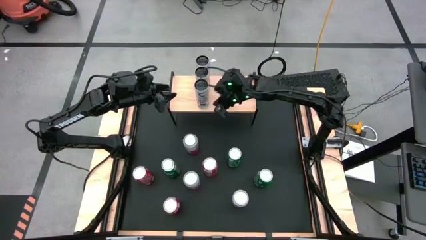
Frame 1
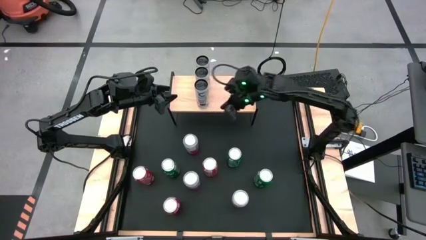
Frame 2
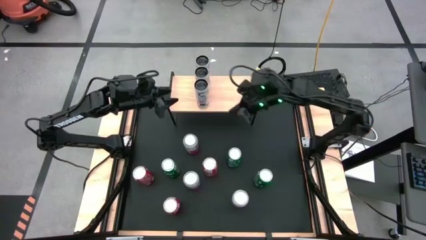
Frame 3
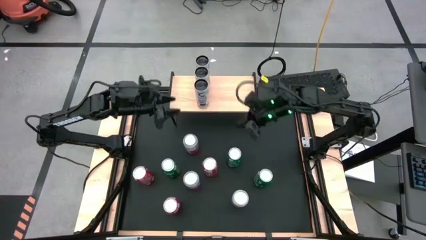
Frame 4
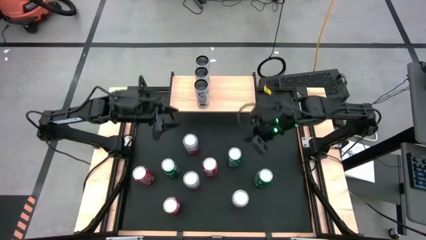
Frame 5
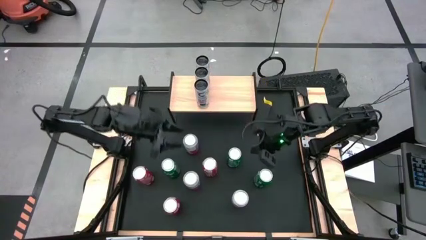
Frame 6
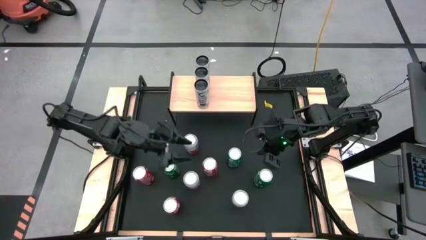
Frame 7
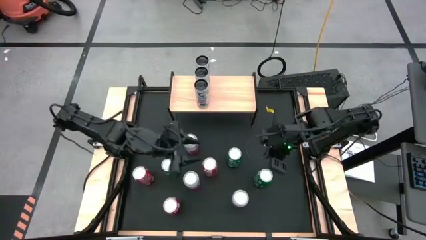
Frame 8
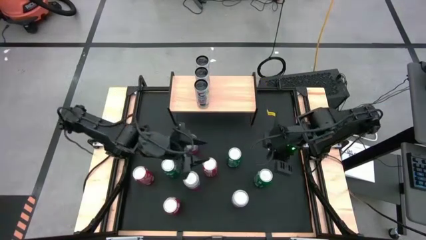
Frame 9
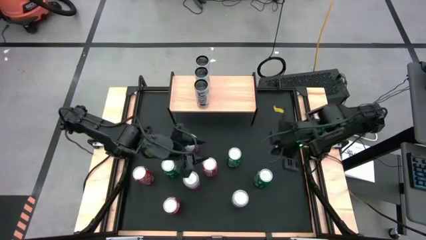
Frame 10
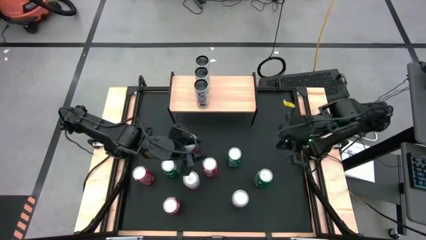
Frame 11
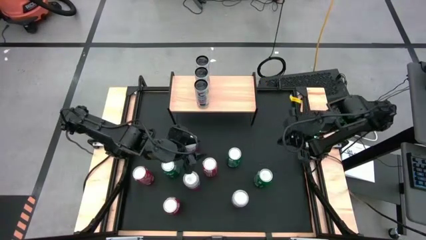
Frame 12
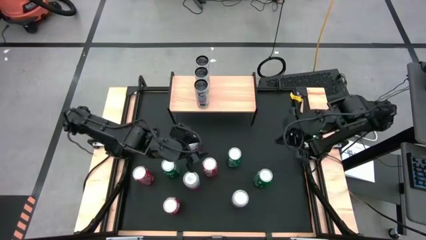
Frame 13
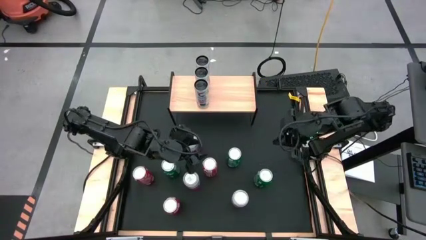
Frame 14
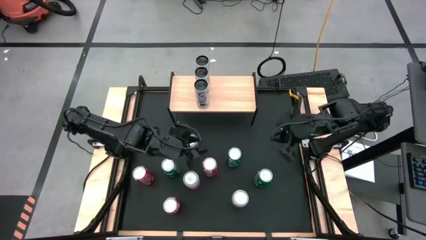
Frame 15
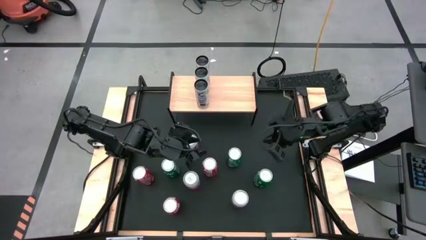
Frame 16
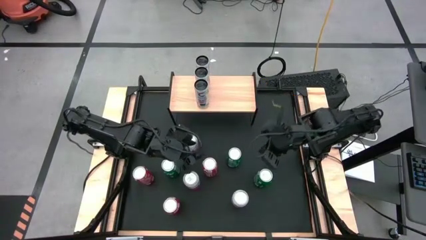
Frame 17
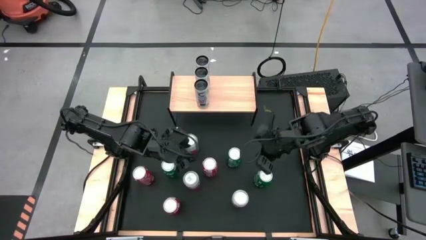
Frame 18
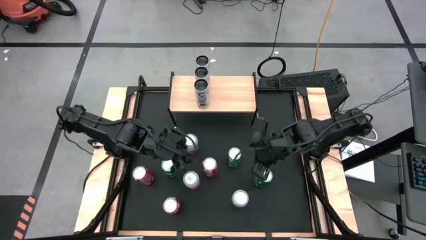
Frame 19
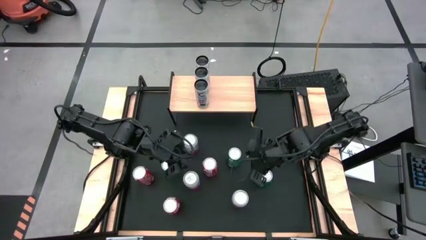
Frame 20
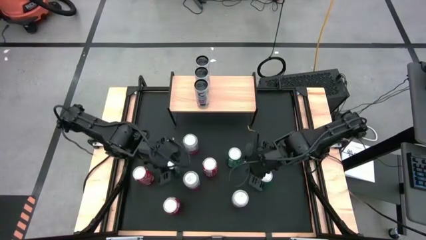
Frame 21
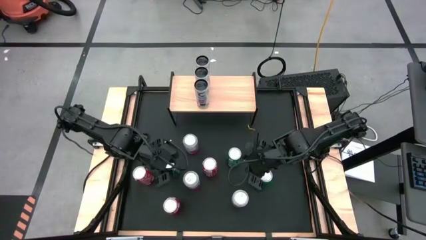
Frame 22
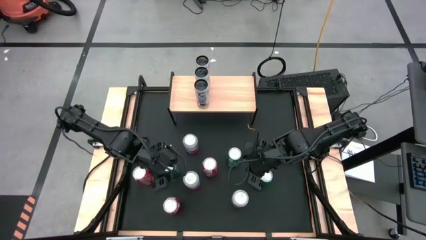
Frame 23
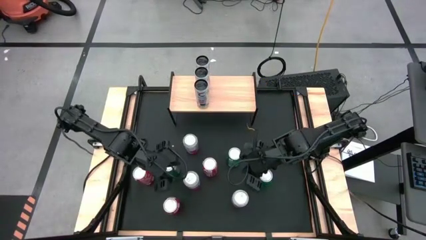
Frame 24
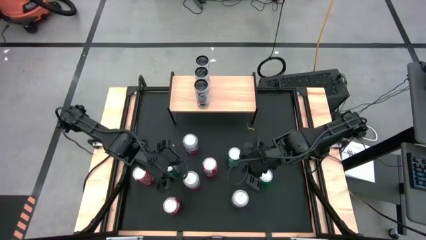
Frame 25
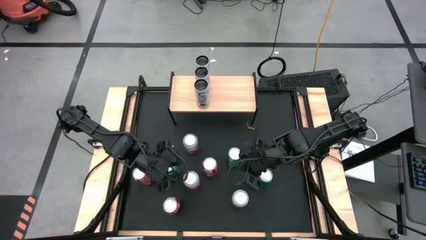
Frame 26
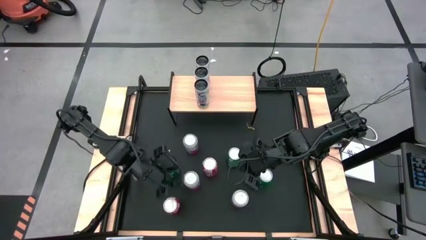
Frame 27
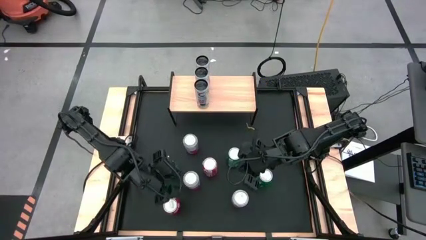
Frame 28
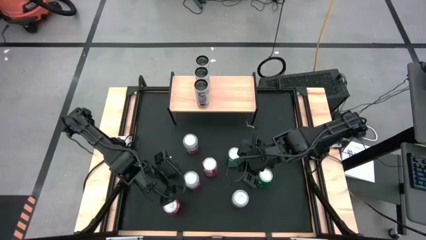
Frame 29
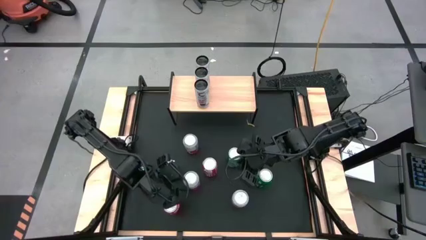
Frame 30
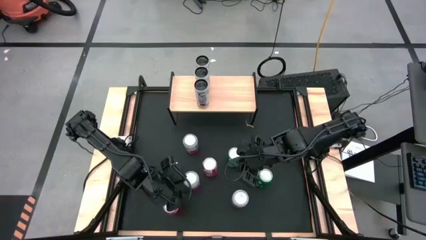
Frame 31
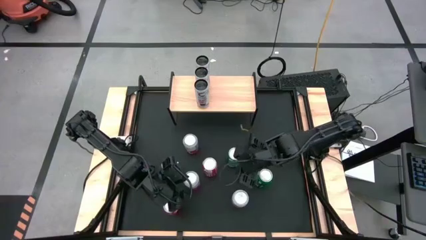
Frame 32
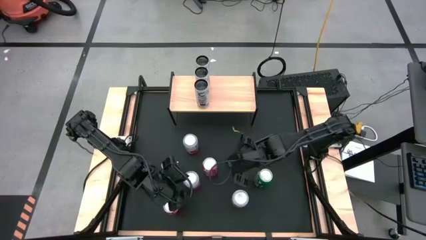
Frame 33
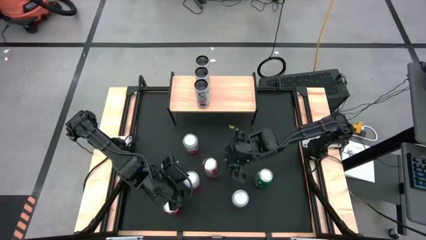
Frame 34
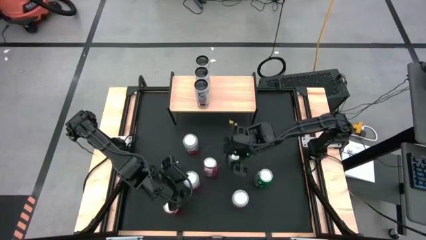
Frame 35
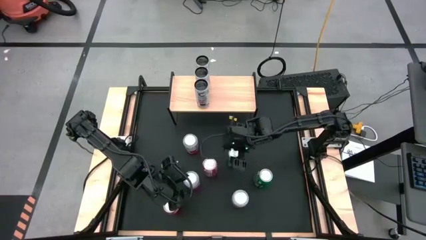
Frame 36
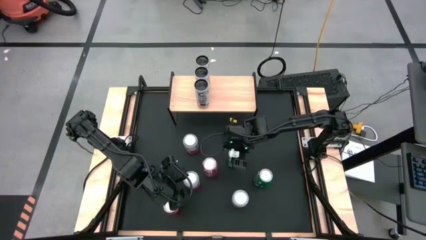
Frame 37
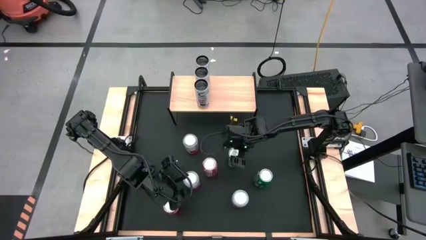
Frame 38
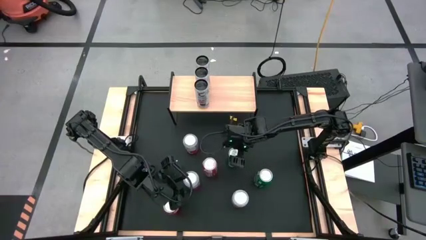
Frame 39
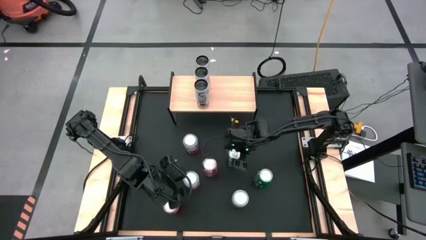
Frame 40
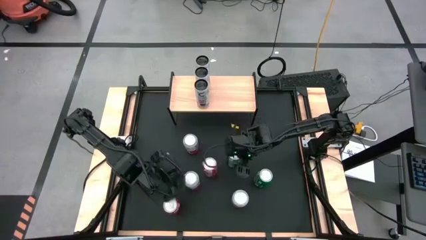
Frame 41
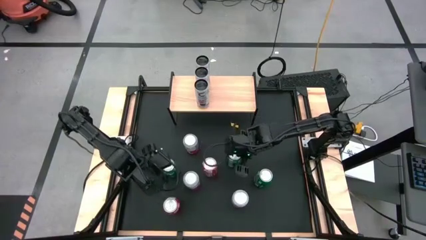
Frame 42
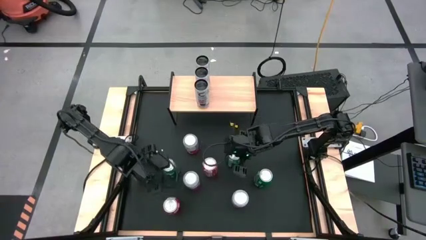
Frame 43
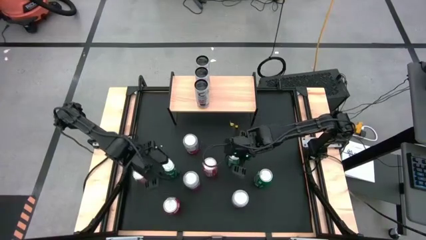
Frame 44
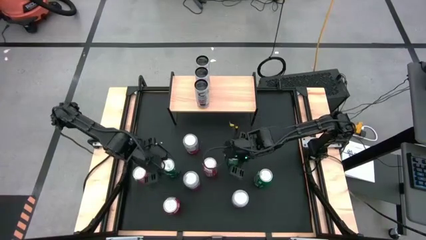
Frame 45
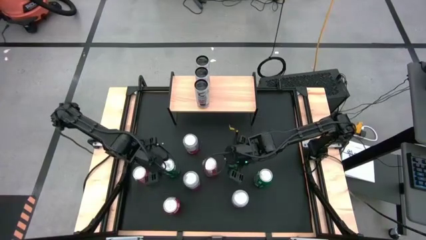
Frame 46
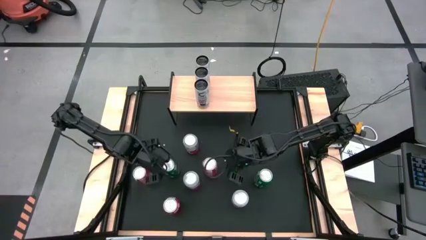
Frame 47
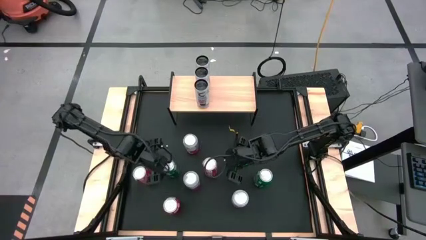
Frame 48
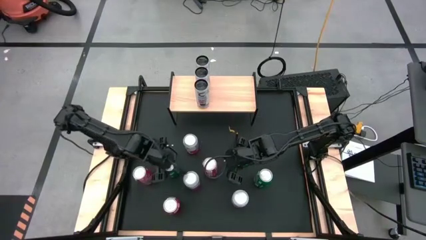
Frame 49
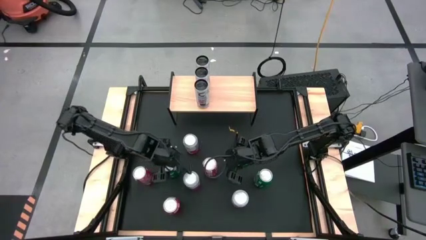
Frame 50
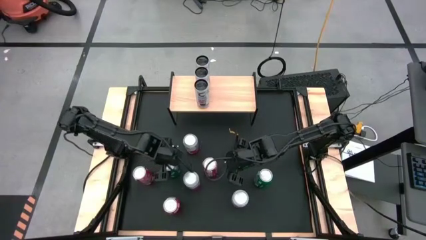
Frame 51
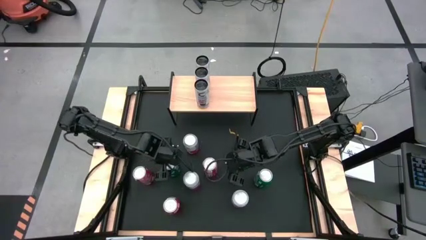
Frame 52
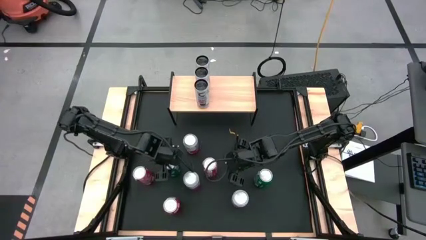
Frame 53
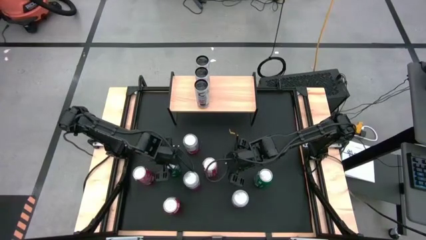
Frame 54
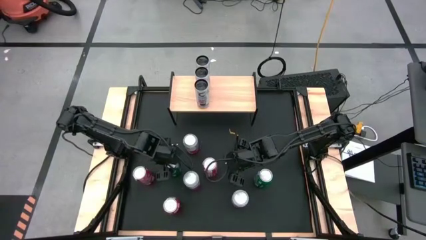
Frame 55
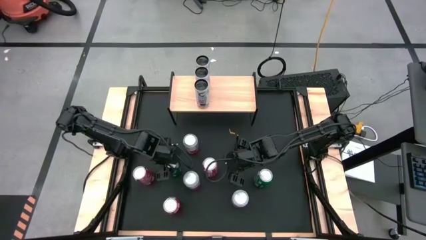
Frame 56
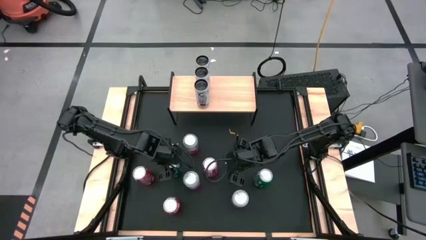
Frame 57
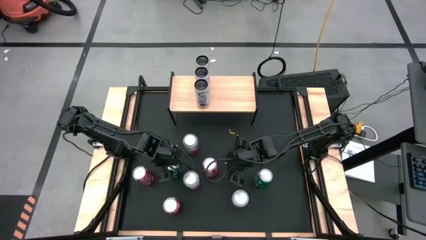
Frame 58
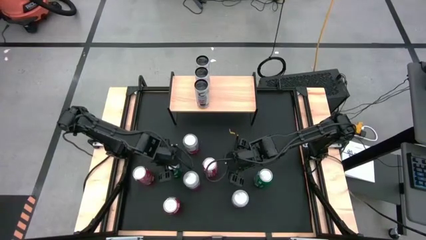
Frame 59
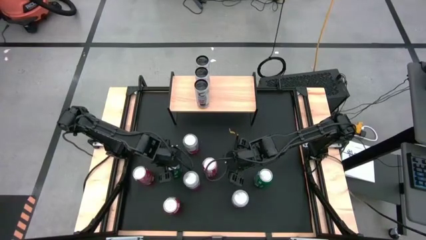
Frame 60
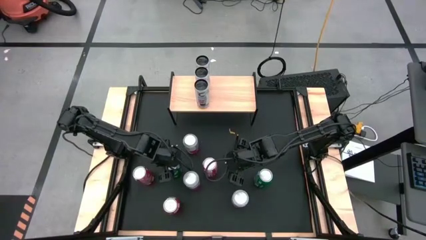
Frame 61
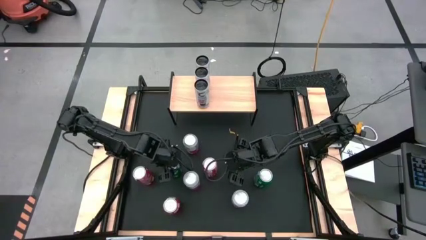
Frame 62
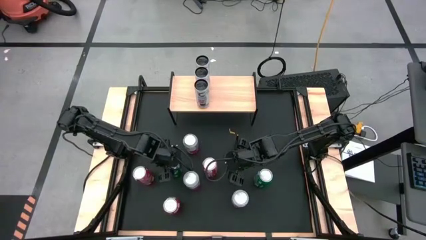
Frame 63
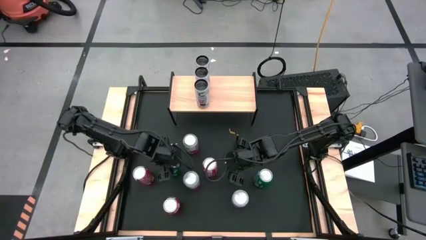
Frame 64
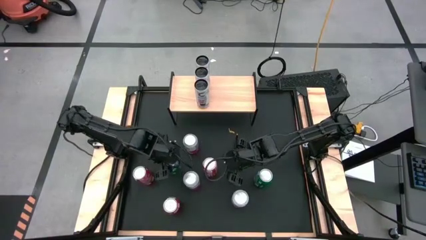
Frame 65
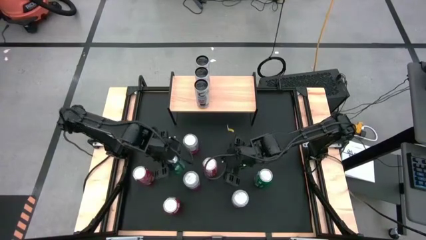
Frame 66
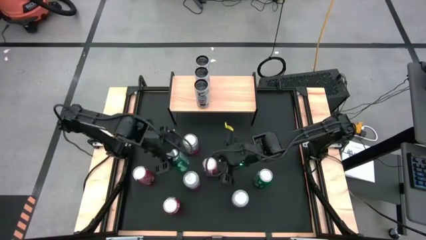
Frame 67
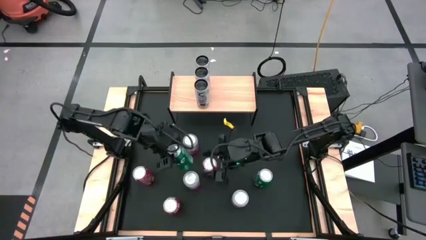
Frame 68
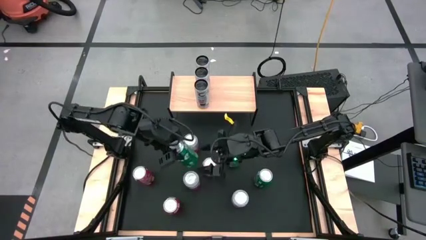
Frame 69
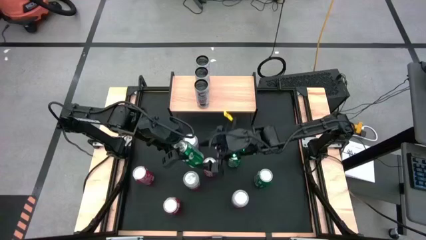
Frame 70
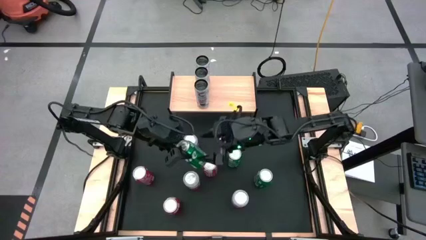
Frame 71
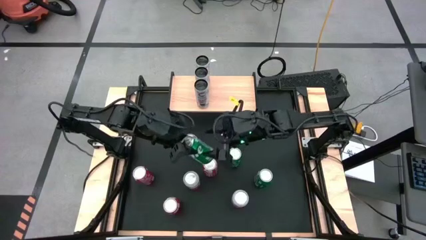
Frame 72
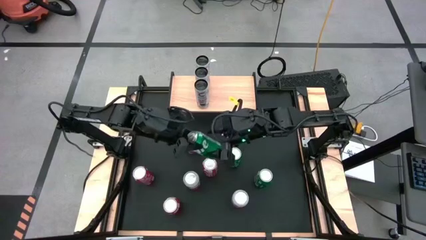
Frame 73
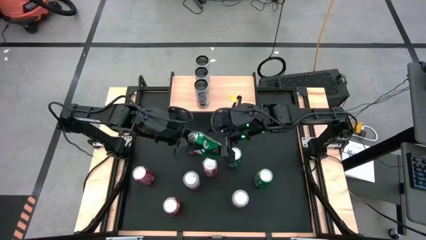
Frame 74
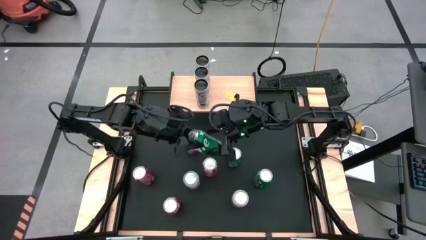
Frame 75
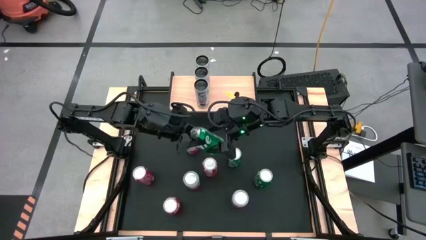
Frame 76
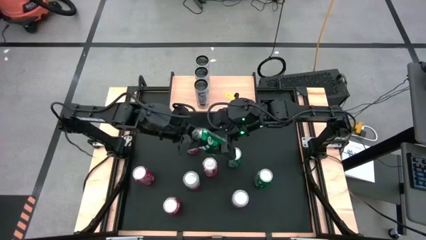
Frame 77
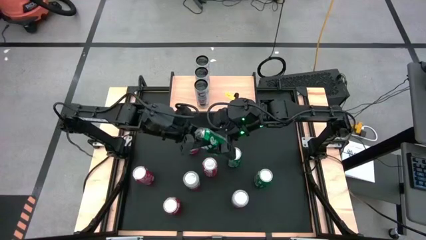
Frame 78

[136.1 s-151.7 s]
Task: Place canned beverage on shelf
Put the left green soda can on the shelf
